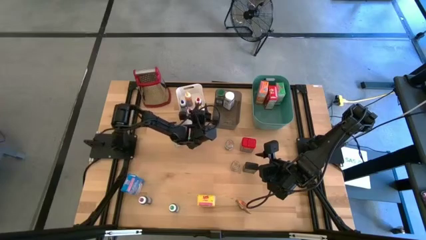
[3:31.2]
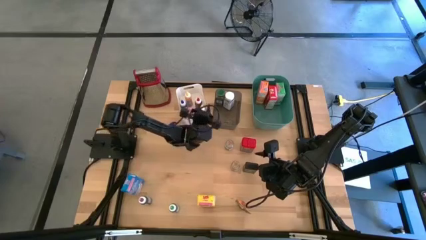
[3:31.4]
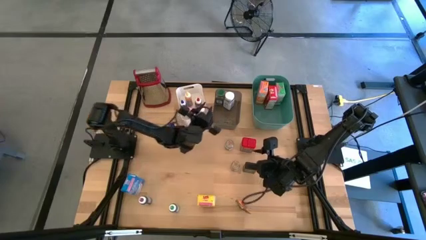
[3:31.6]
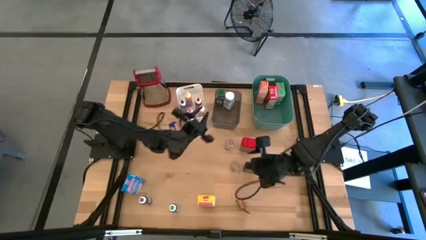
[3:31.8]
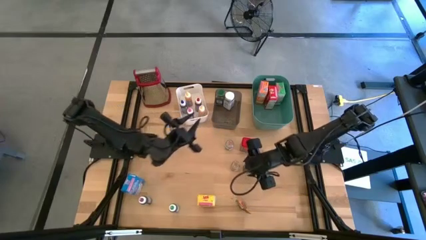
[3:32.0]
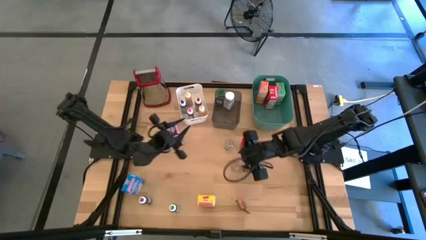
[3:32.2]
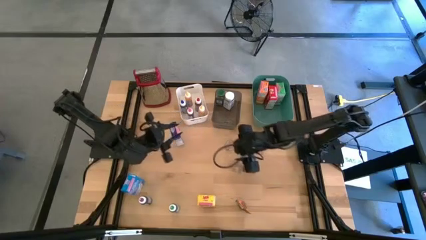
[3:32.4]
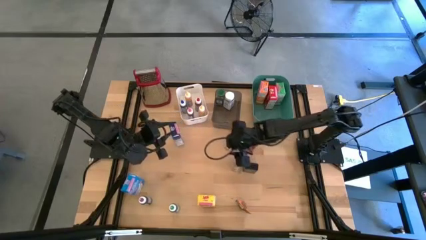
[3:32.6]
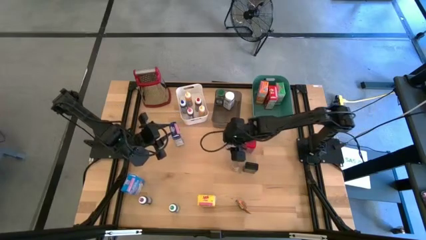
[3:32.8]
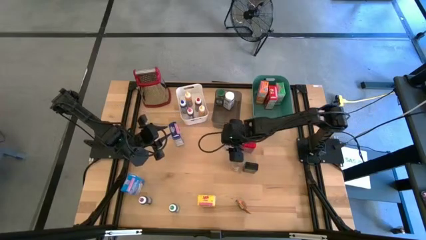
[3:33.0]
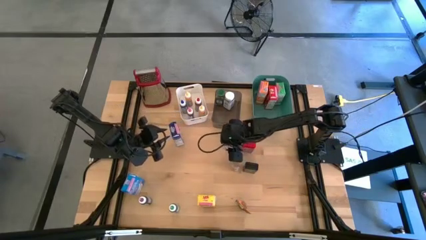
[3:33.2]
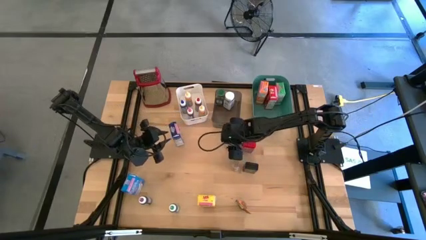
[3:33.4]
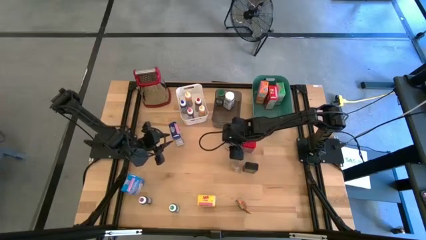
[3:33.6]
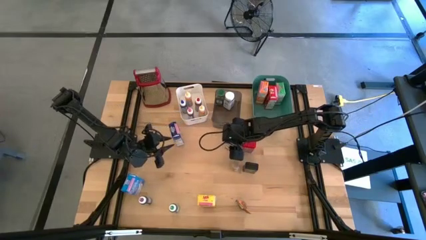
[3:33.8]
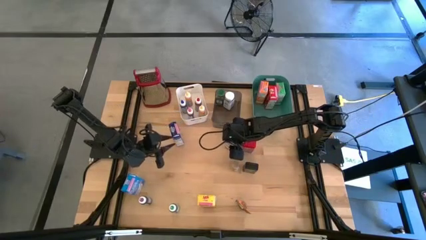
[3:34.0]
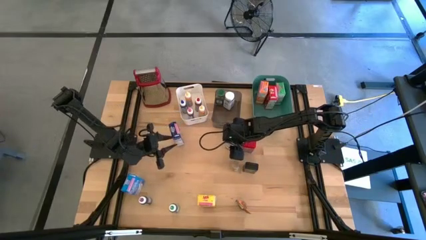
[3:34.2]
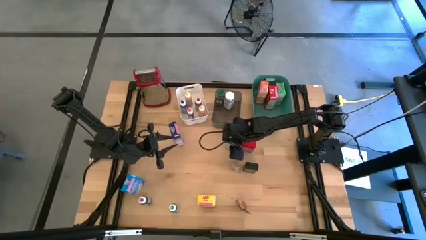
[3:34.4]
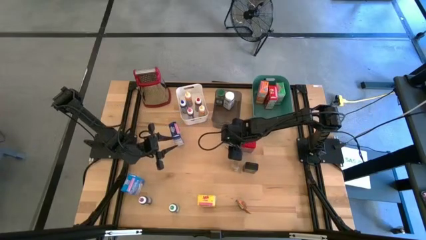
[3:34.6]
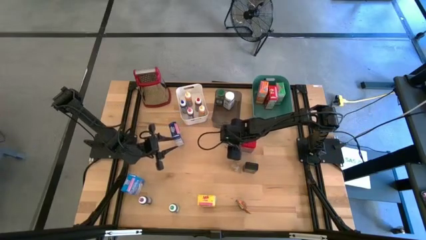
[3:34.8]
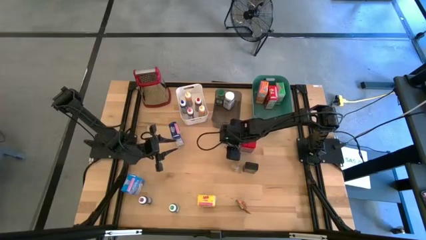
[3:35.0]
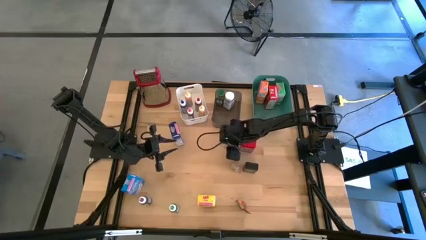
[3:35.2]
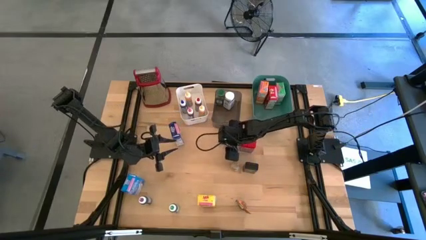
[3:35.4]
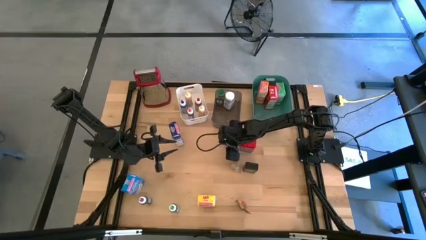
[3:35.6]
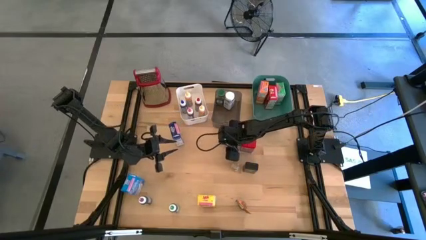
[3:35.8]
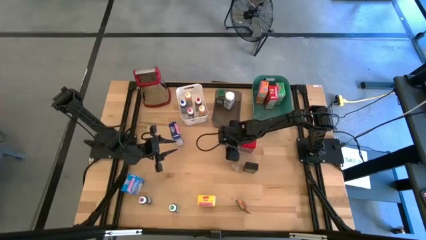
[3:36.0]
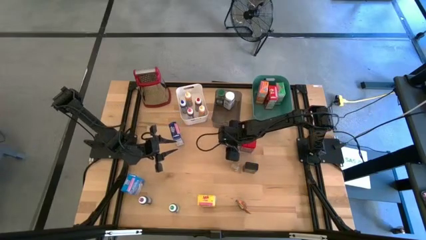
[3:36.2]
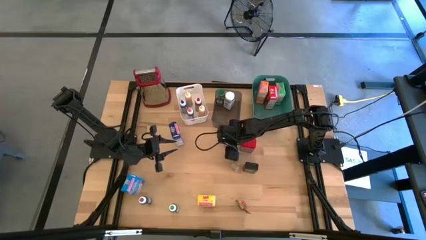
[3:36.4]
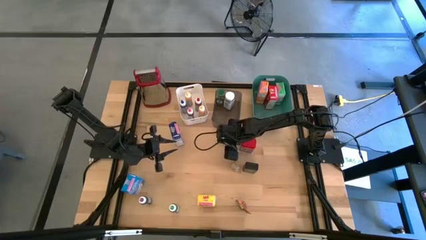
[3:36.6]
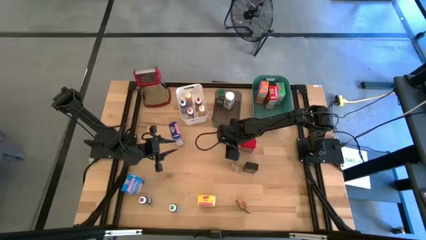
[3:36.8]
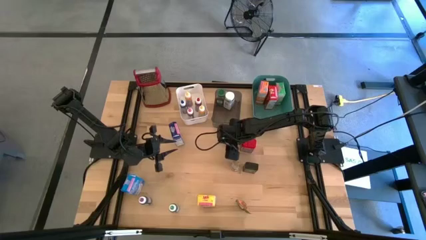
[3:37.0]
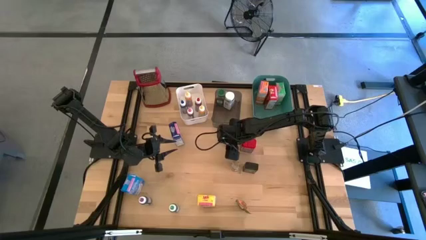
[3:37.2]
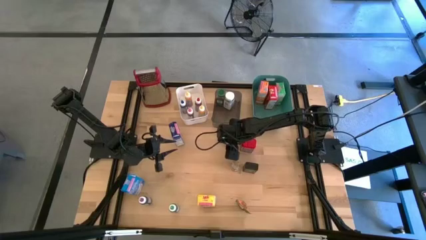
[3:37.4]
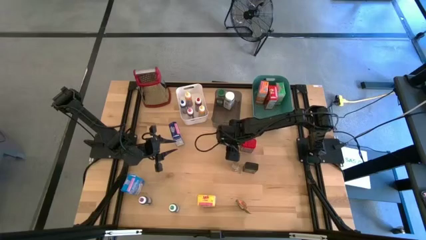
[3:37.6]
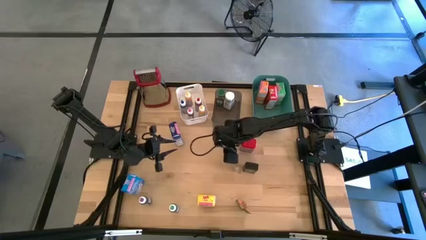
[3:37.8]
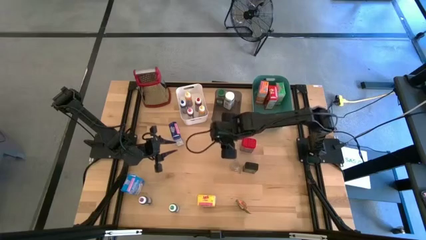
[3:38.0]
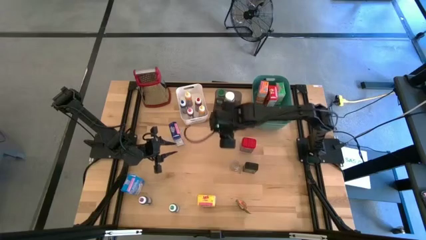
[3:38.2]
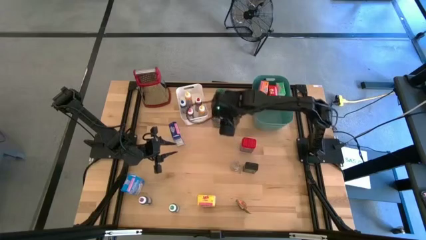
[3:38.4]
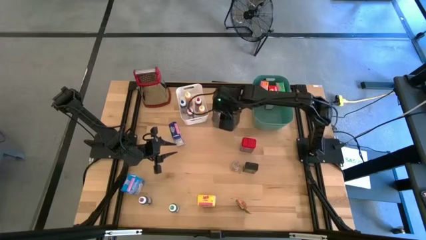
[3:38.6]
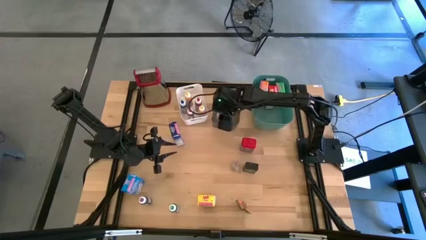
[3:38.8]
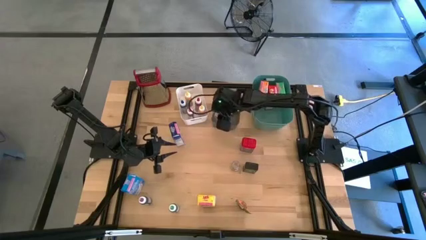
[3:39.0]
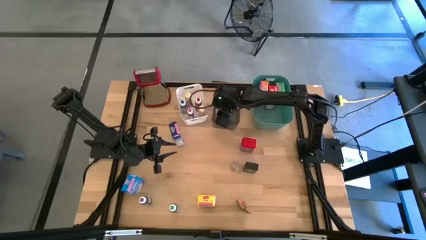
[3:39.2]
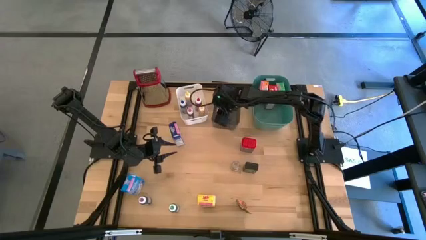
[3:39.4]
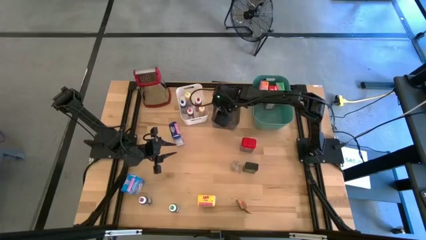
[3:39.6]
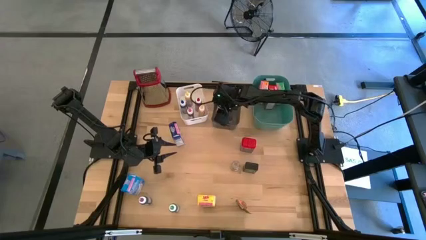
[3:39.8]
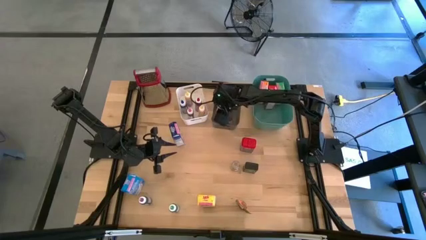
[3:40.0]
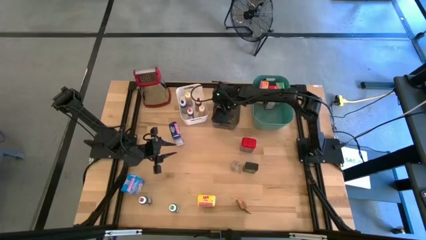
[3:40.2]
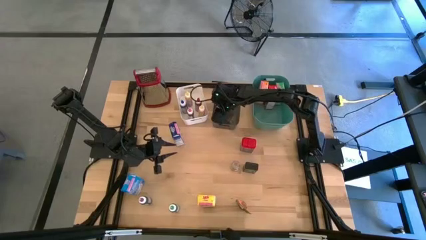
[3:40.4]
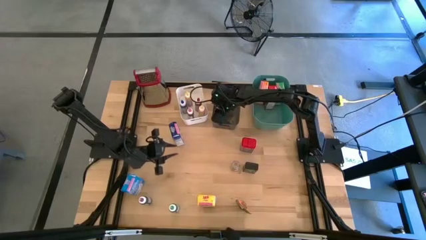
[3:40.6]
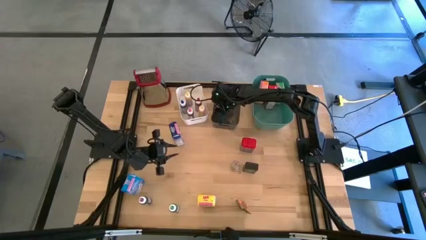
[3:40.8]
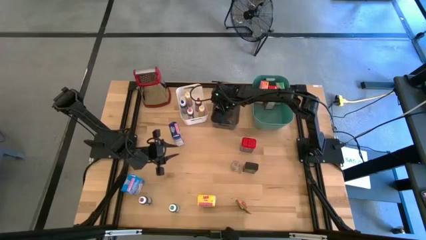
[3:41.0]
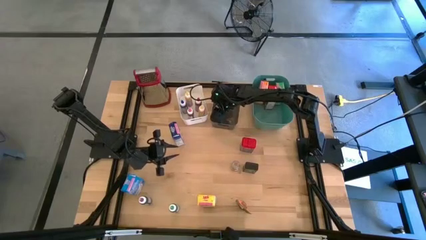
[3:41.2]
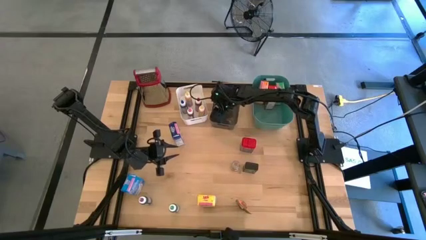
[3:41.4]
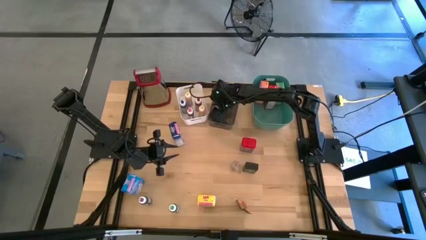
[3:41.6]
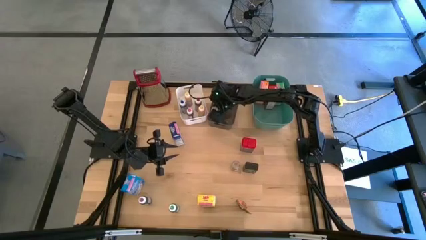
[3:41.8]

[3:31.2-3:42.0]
Task: Pick & Place Kitchen Items
Put the top brown spice bottle into the black bin

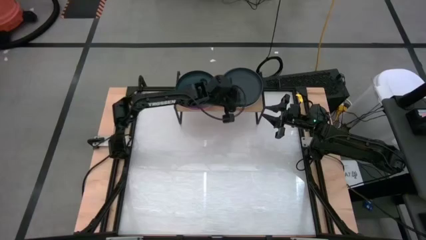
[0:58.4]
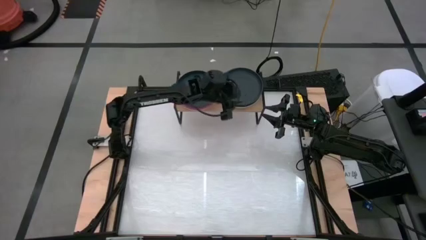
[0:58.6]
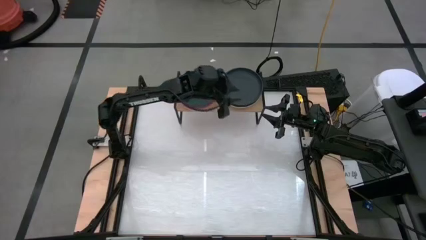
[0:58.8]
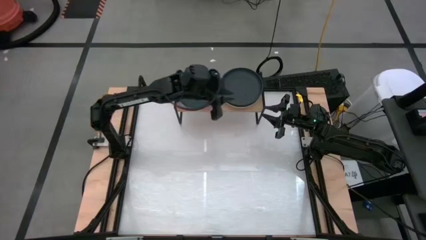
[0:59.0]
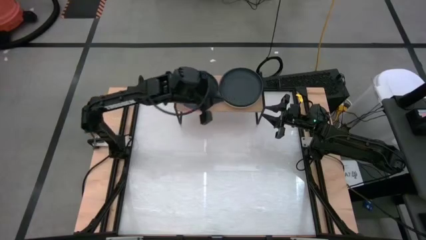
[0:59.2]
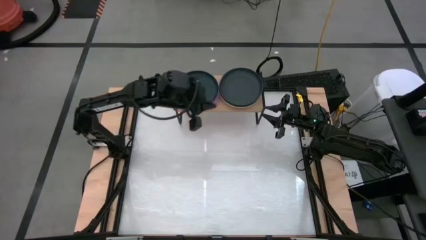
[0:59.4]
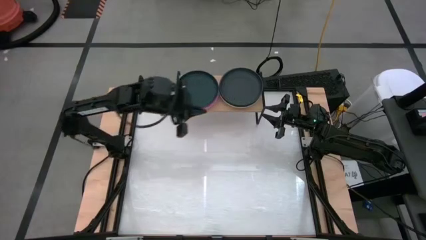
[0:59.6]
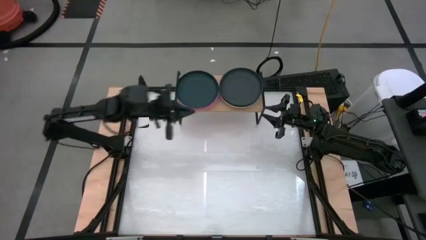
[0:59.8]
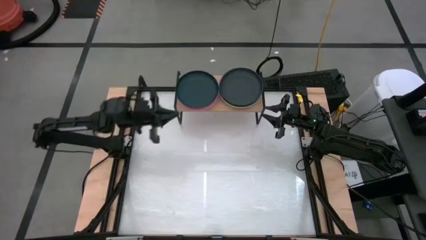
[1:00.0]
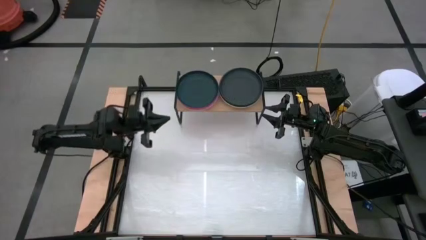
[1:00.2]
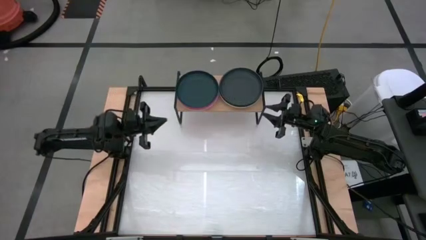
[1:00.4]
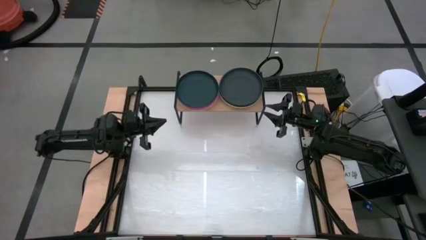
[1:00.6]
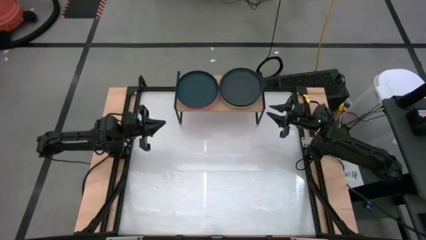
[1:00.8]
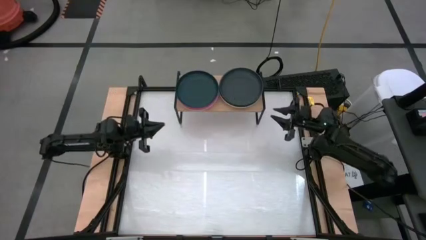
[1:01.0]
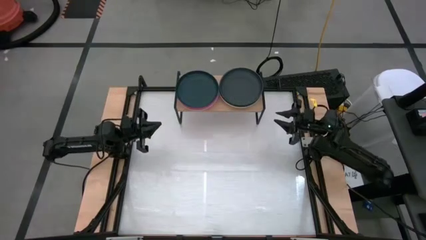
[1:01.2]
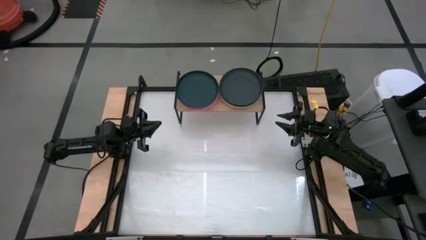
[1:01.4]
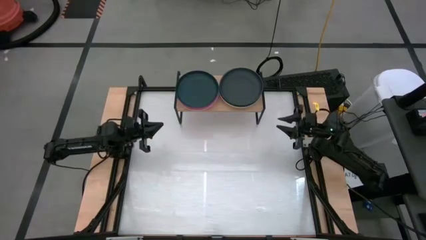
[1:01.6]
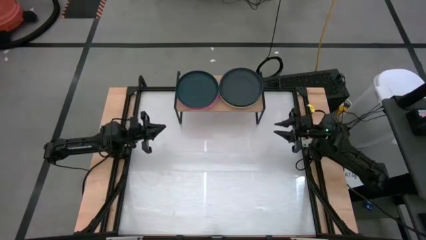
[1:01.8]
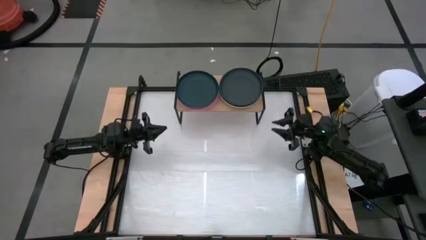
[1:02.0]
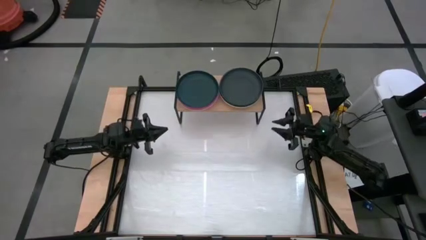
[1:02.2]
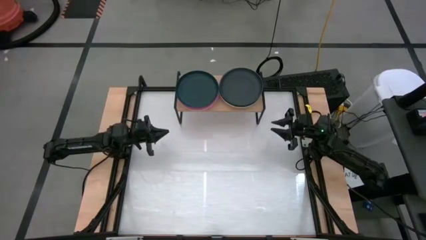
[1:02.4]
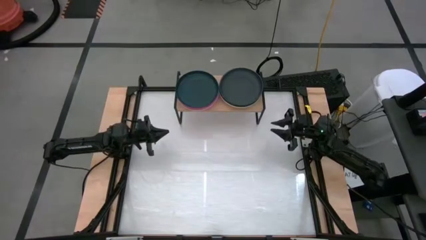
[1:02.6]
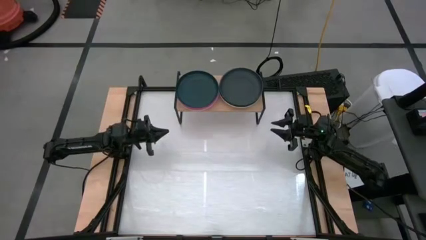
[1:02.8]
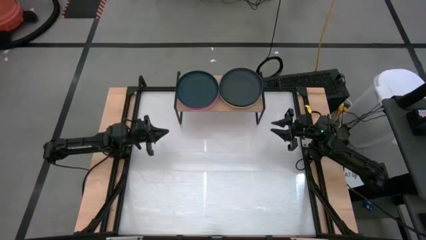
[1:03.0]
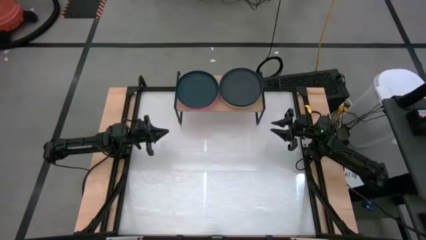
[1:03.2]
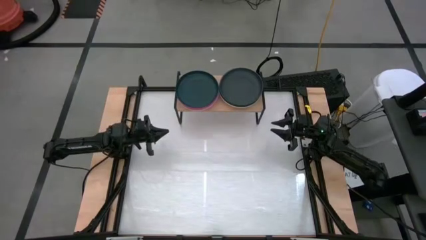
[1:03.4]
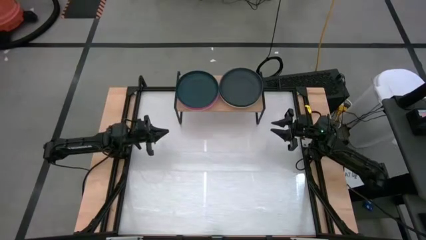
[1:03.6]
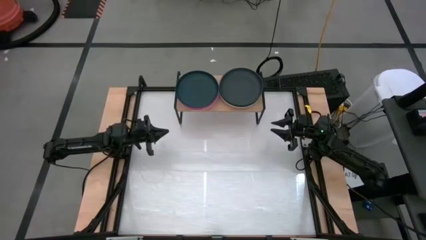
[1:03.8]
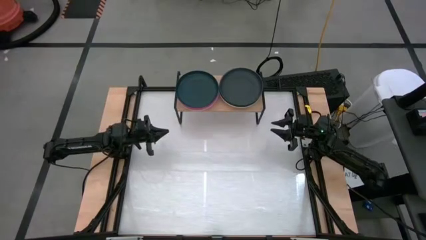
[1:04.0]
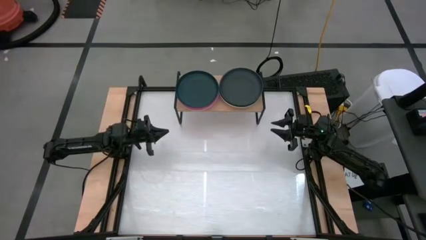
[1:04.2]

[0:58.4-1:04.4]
Task: Place and stack plates onto a shelf
Return to Home Position
